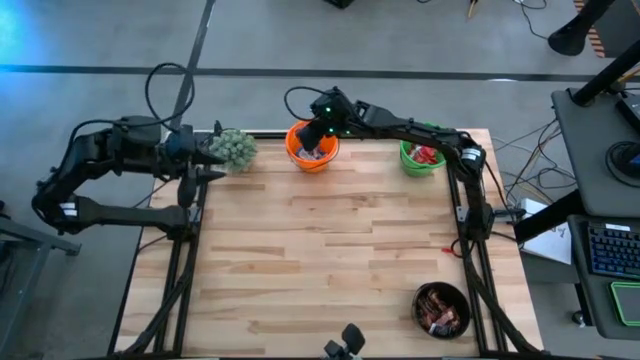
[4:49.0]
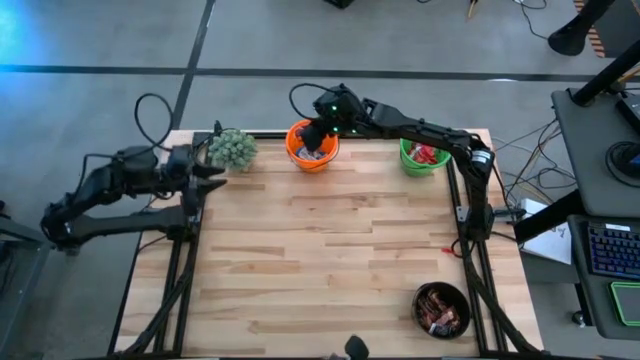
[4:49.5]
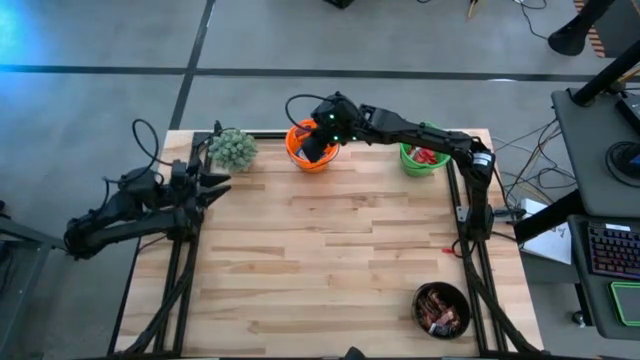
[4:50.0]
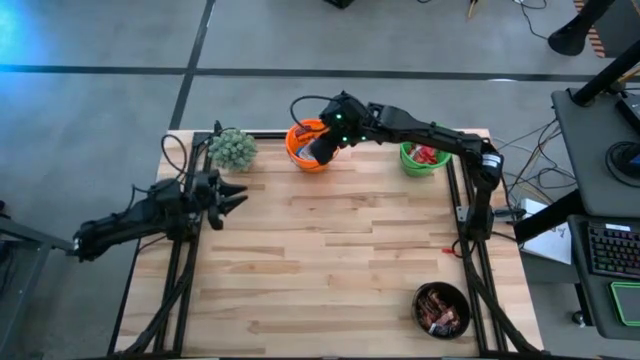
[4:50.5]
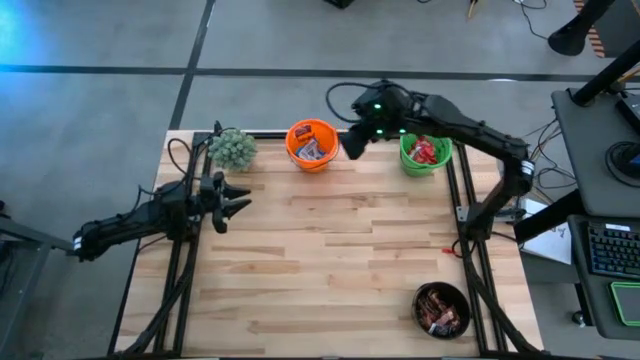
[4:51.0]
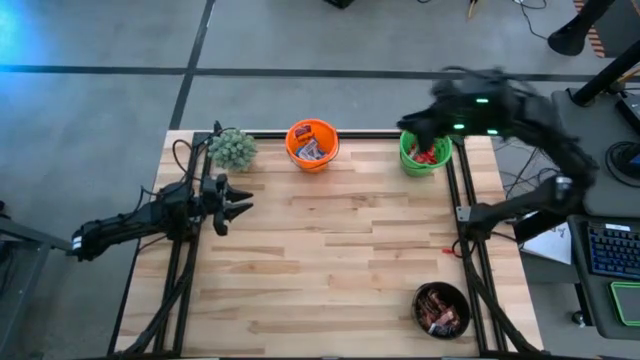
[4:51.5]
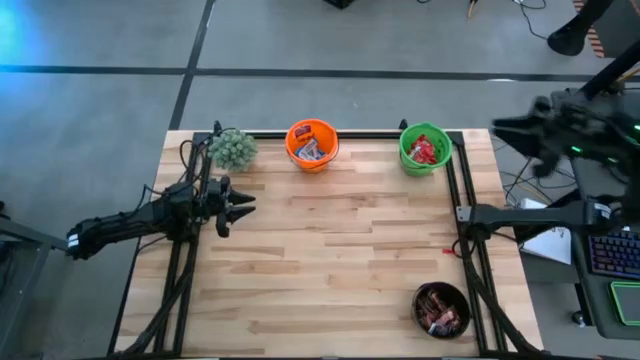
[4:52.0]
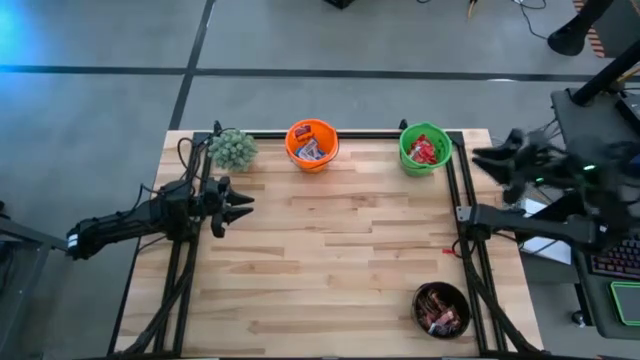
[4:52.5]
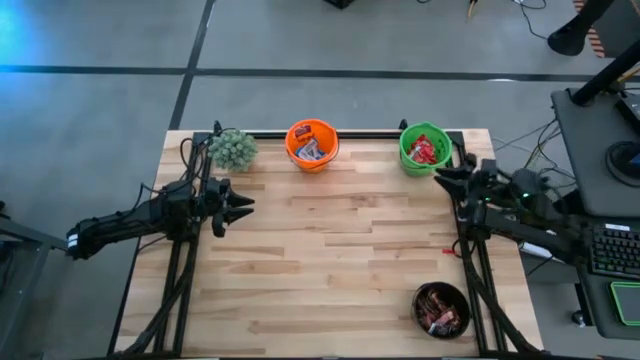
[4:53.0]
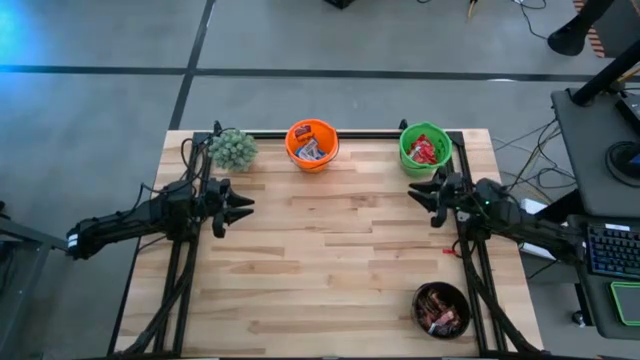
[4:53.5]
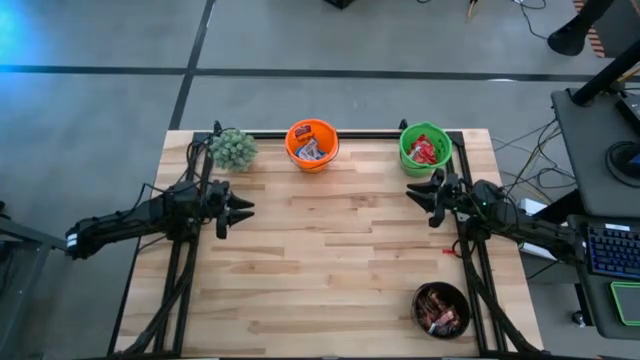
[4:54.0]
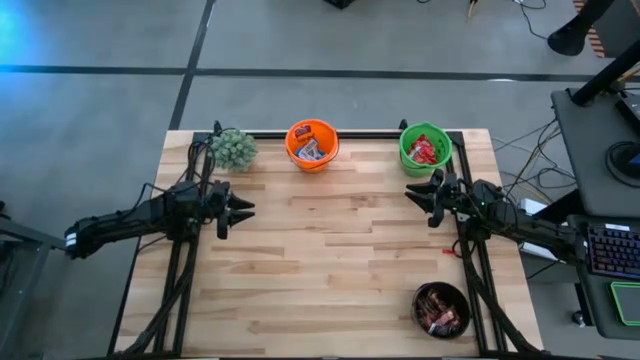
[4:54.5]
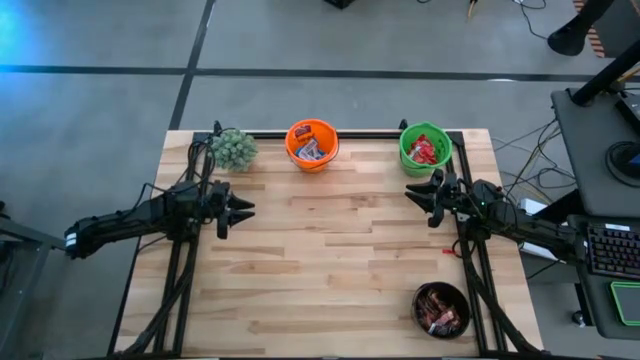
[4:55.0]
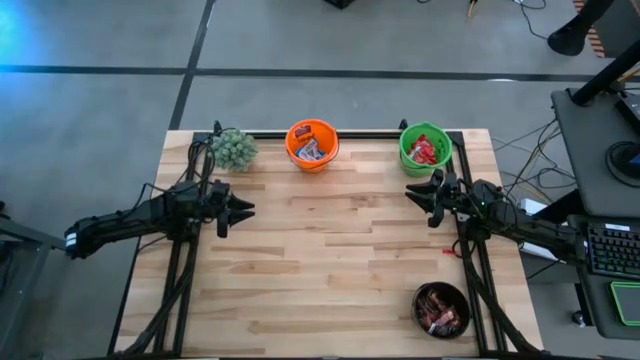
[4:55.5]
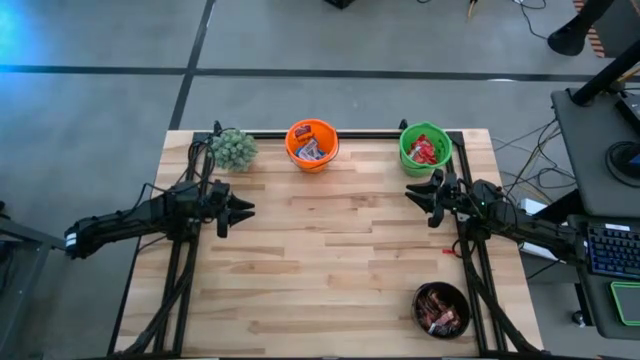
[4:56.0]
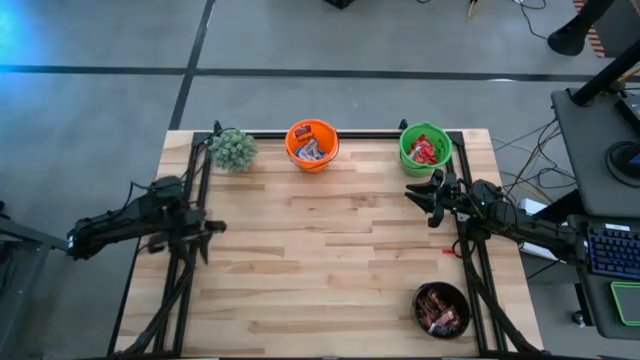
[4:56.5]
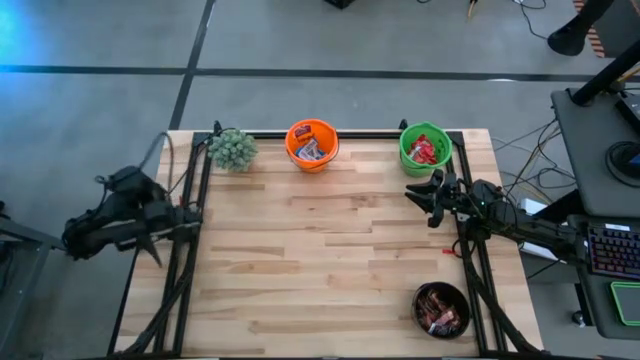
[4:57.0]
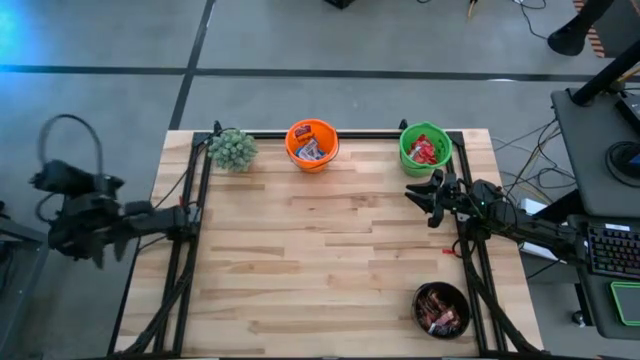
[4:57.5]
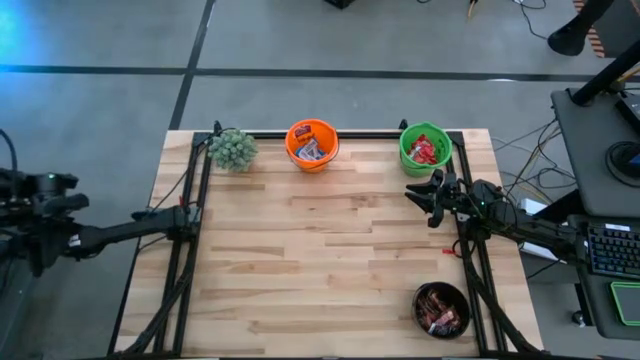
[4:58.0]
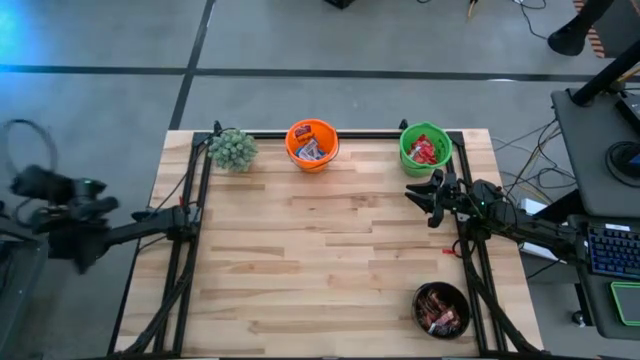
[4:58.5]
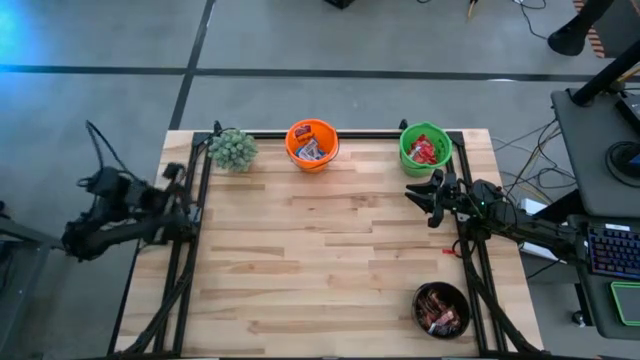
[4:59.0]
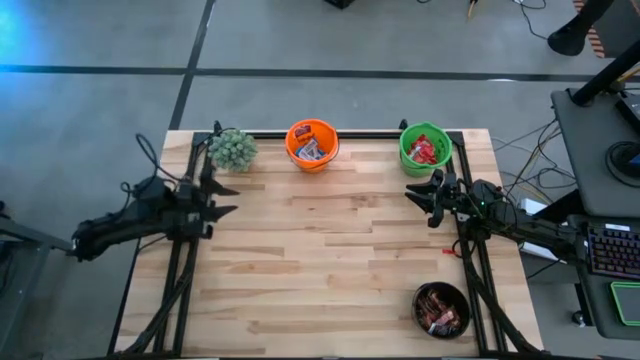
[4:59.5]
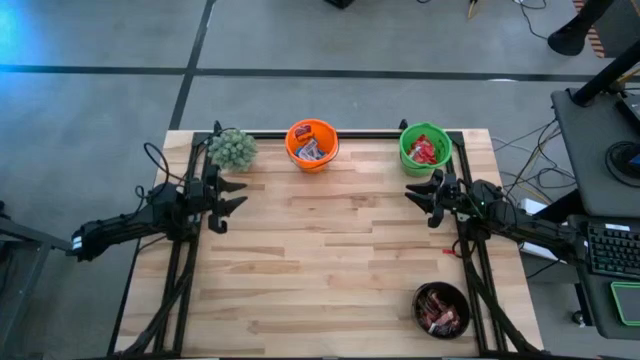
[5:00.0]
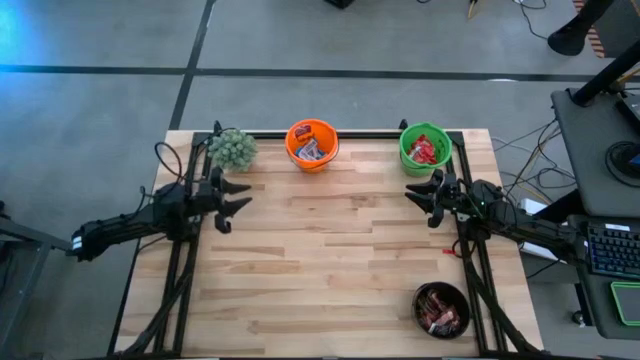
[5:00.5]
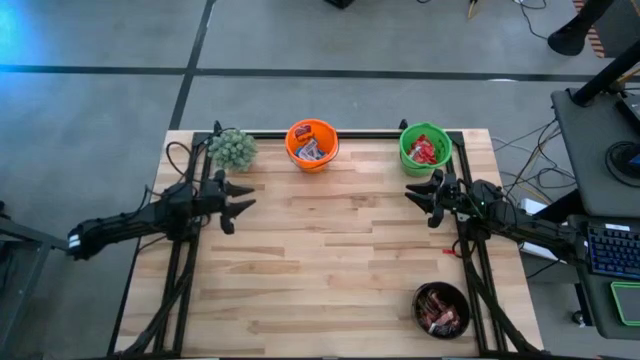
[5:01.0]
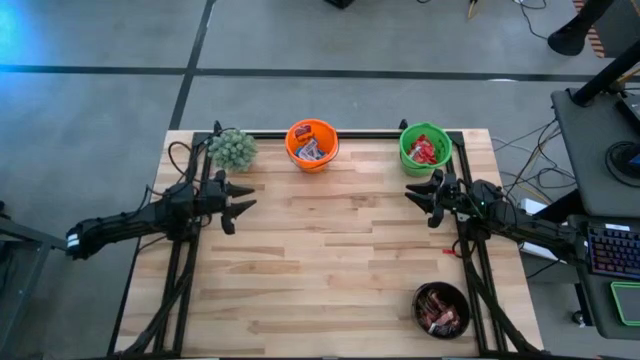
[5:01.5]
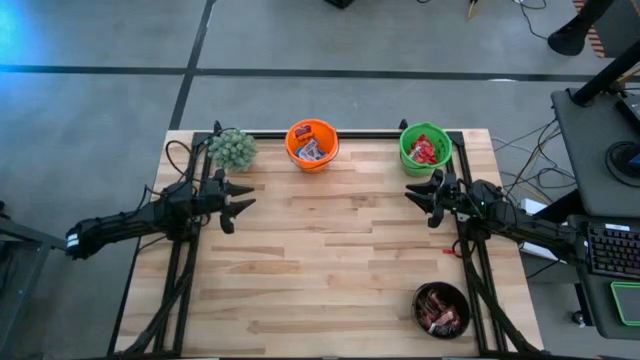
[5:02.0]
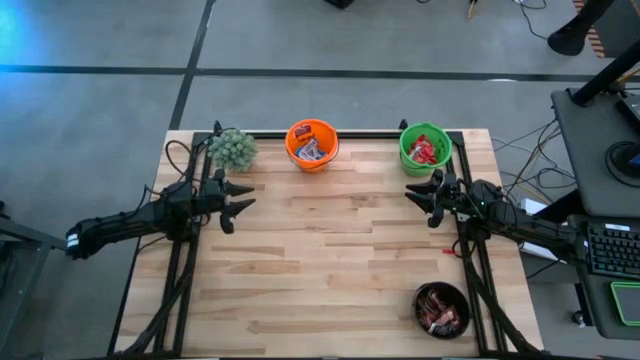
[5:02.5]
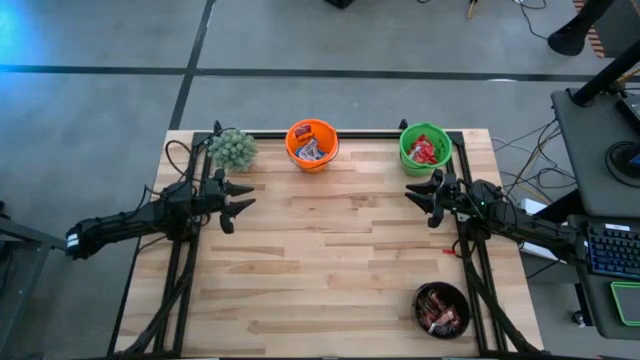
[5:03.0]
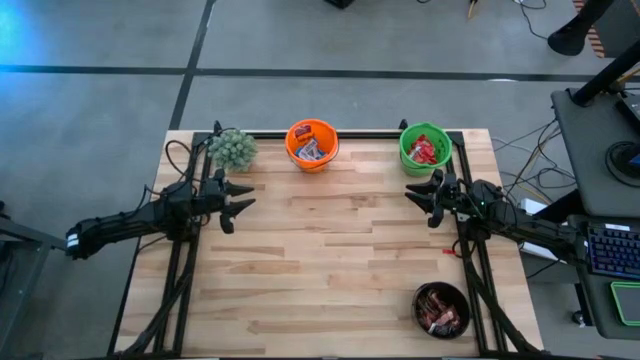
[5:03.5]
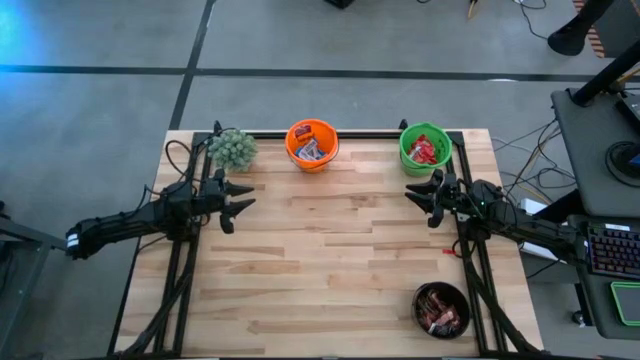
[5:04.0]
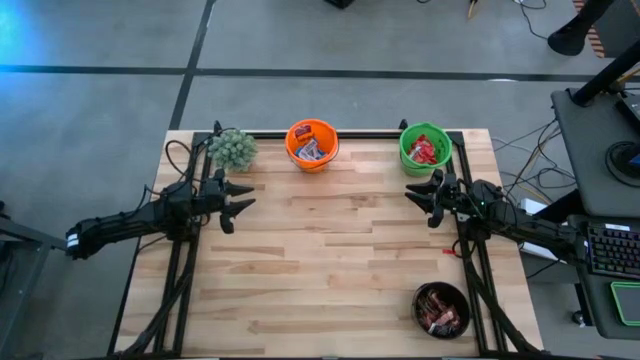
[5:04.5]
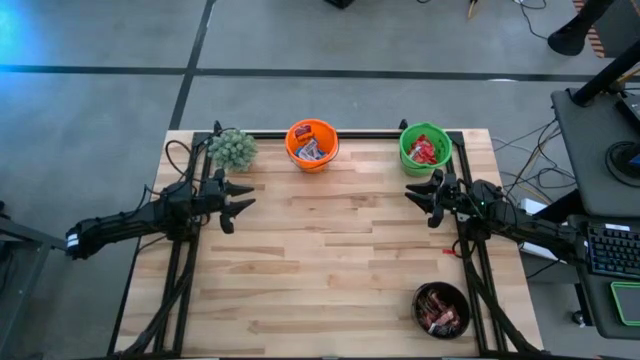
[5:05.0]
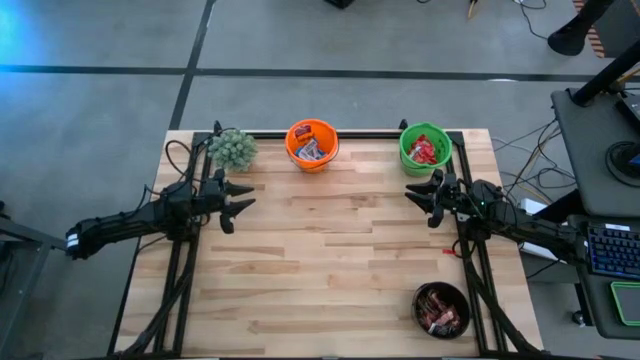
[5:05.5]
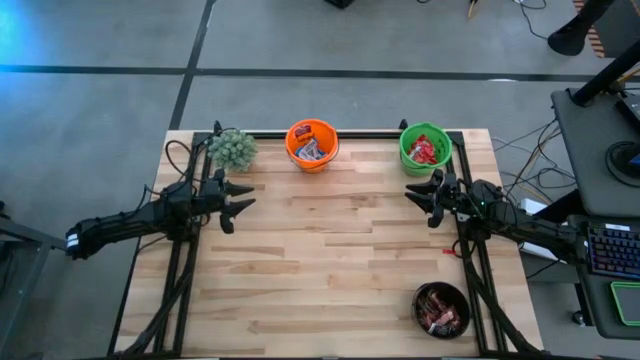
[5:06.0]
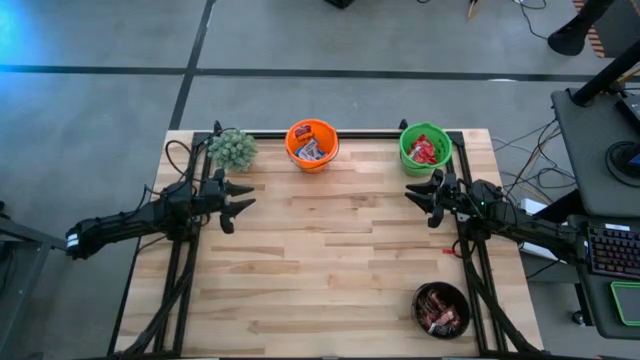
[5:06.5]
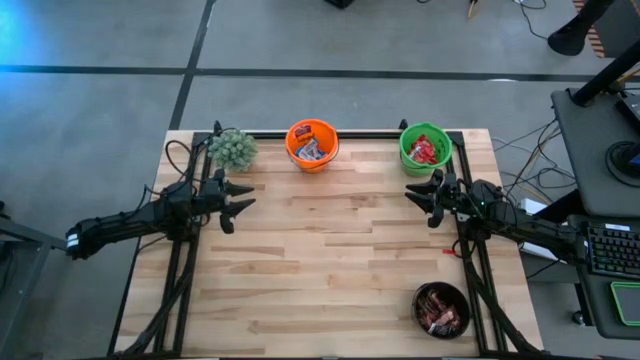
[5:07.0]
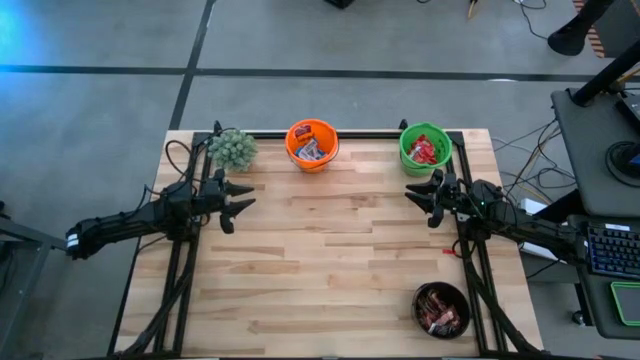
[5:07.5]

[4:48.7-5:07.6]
Task: Sort candy
Return to Home Position

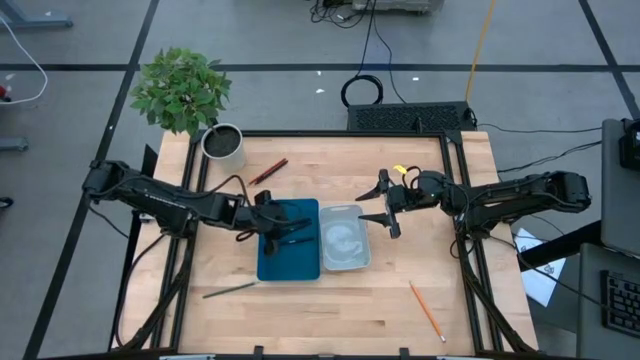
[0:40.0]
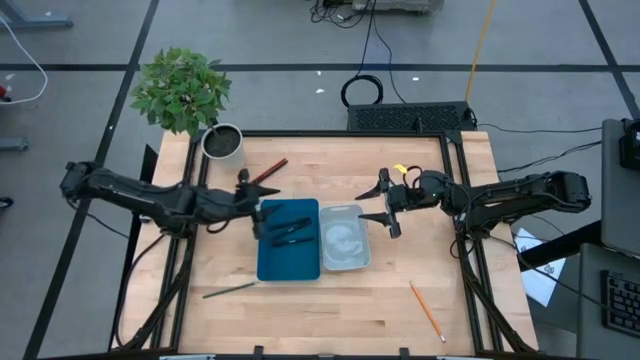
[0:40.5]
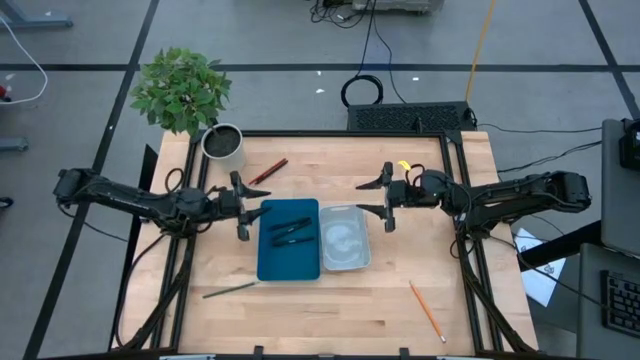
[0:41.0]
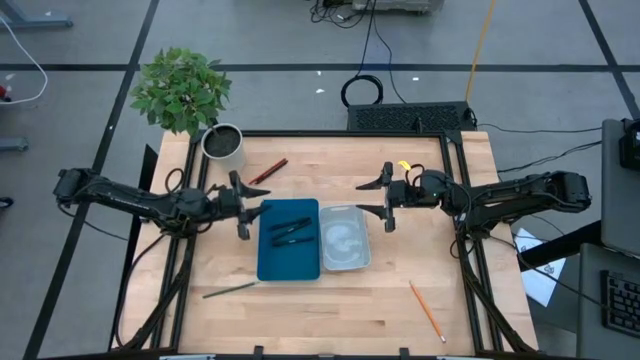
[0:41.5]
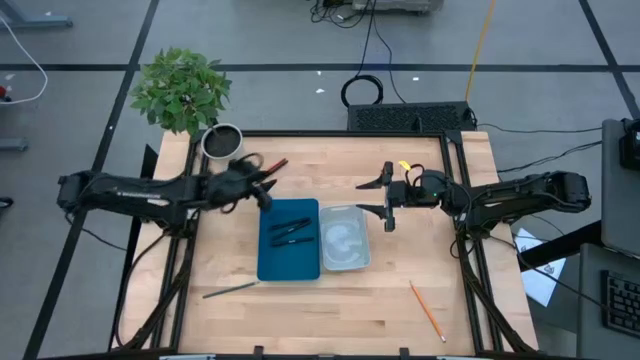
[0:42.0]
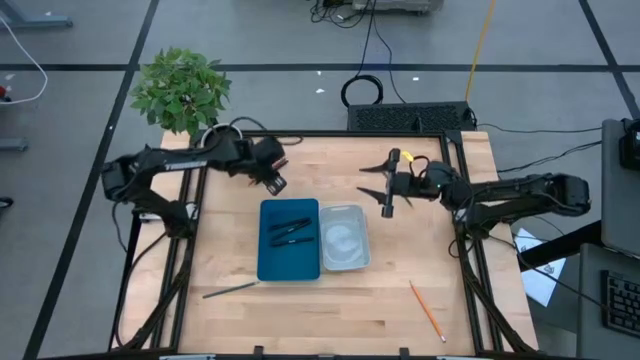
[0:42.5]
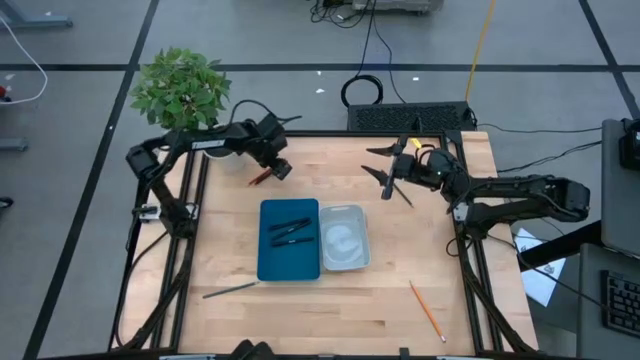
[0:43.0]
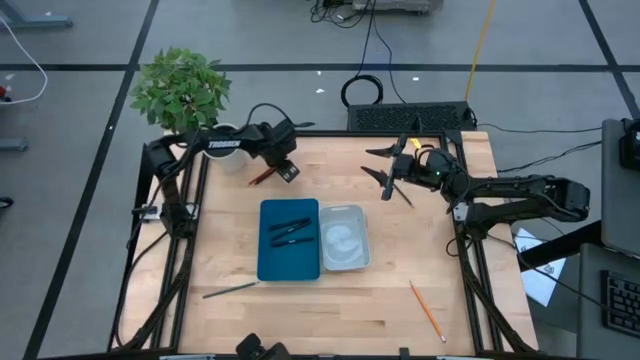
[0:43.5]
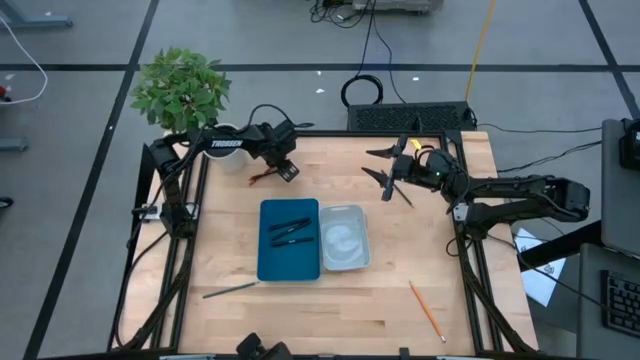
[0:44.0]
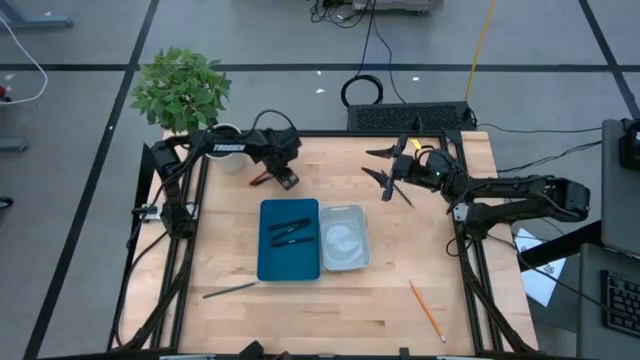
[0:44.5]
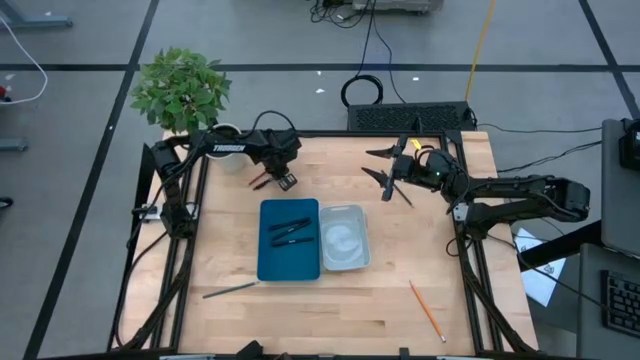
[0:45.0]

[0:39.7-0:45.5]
Task: Sort pens & pencils
Put the black pen into the blue bin
